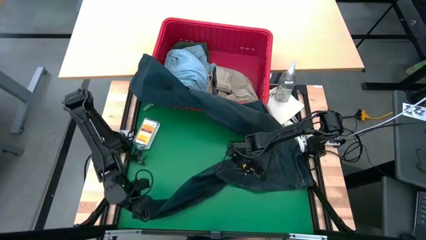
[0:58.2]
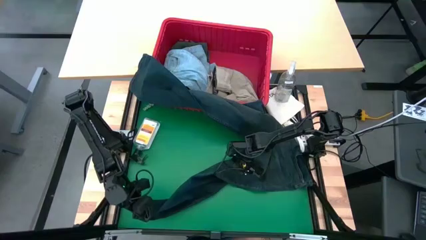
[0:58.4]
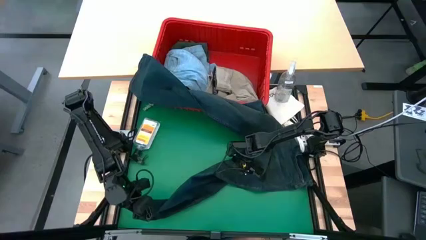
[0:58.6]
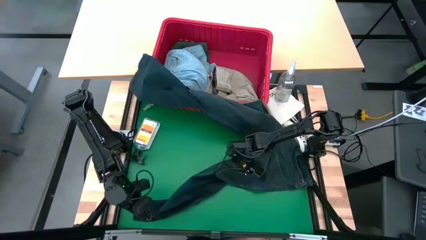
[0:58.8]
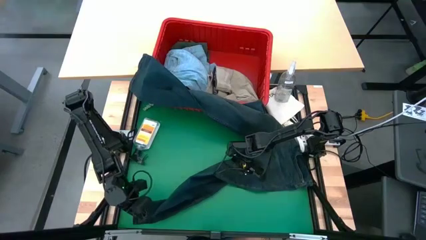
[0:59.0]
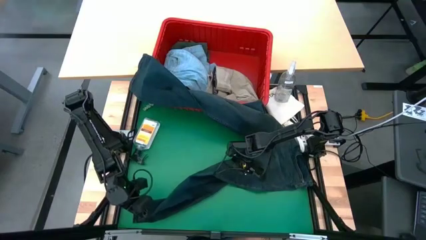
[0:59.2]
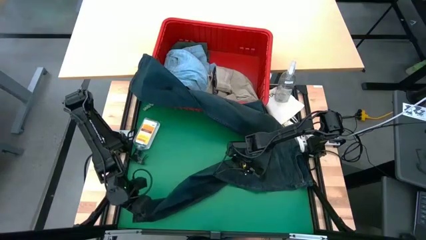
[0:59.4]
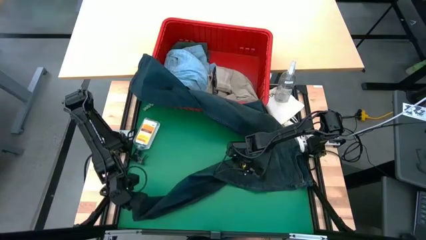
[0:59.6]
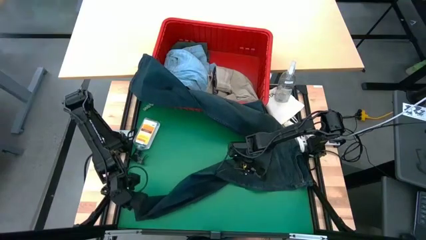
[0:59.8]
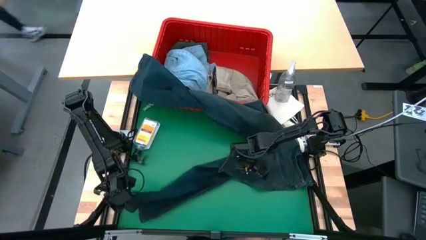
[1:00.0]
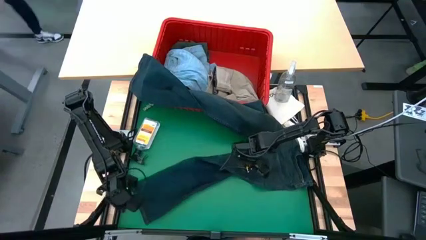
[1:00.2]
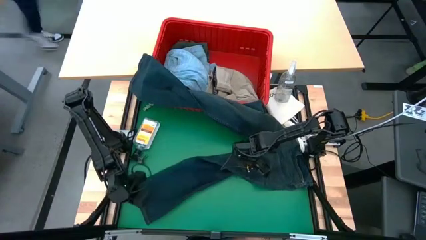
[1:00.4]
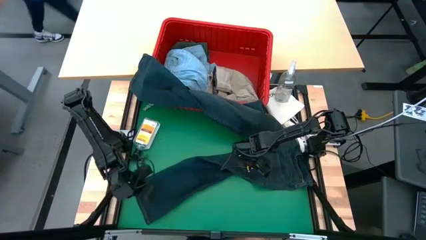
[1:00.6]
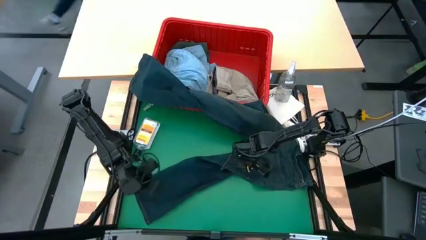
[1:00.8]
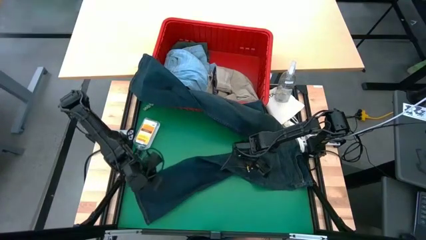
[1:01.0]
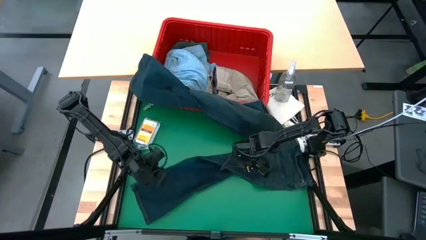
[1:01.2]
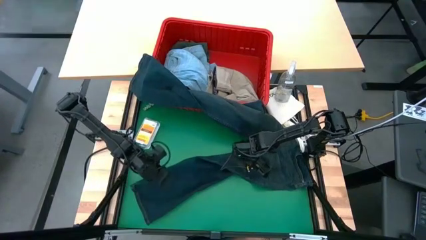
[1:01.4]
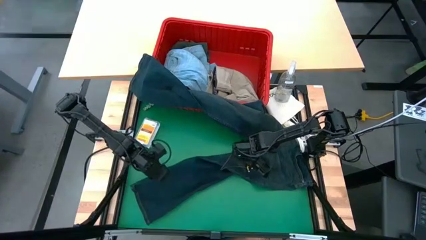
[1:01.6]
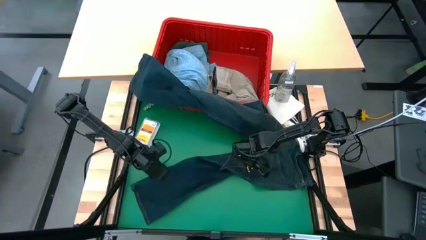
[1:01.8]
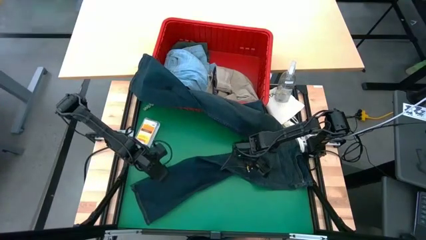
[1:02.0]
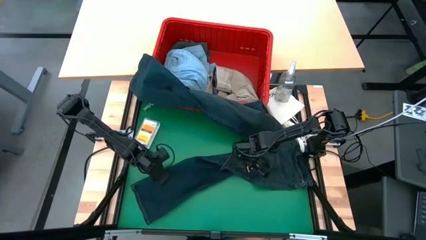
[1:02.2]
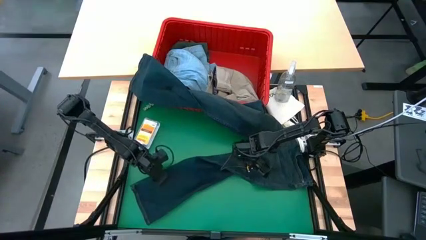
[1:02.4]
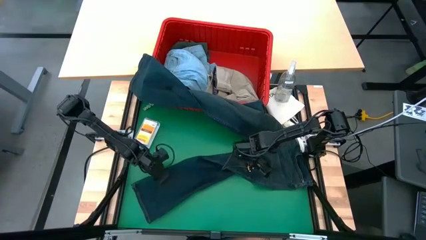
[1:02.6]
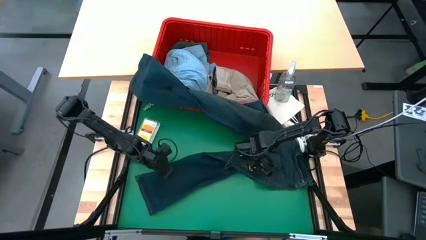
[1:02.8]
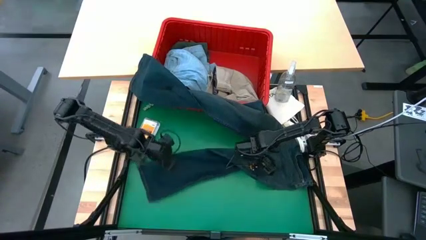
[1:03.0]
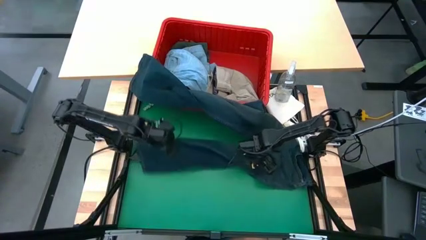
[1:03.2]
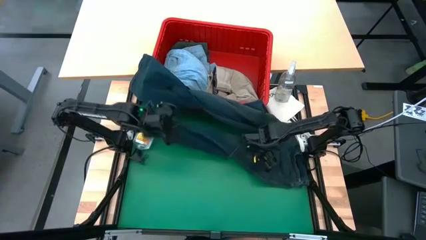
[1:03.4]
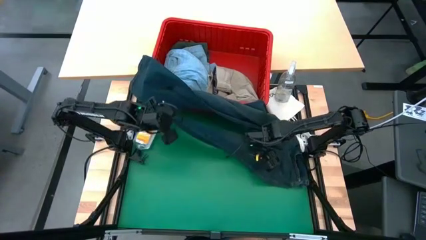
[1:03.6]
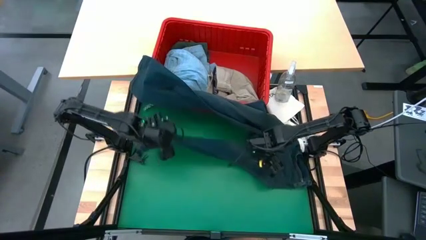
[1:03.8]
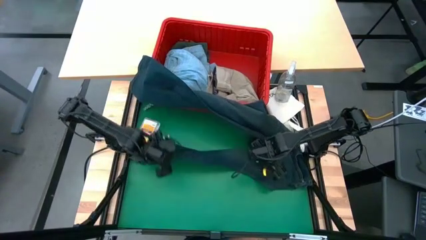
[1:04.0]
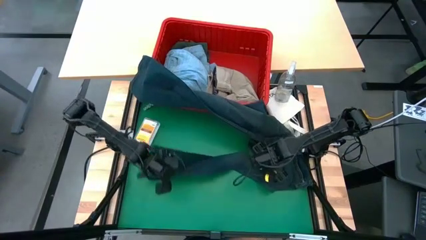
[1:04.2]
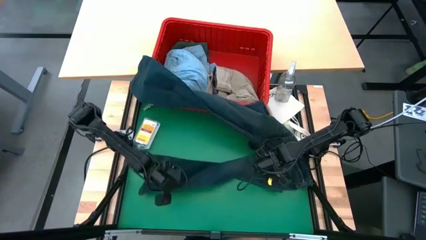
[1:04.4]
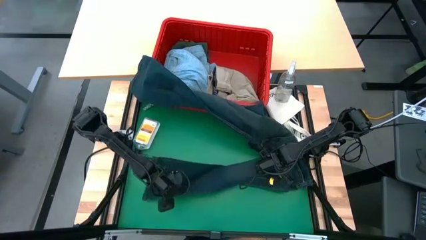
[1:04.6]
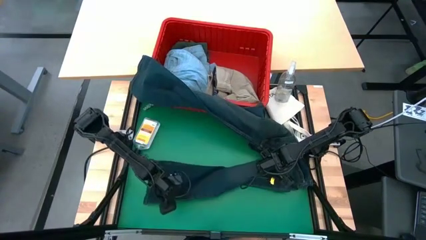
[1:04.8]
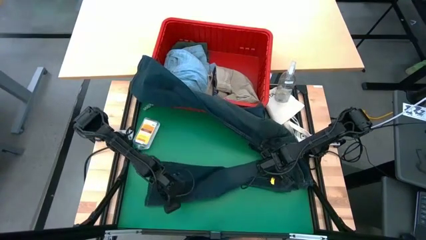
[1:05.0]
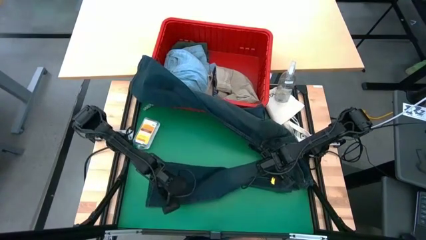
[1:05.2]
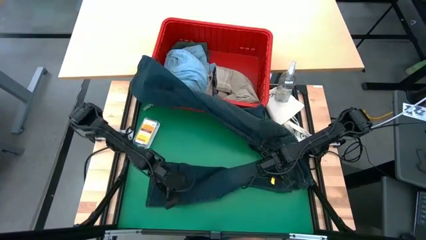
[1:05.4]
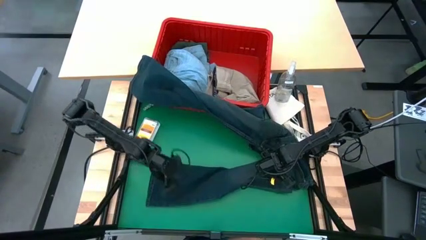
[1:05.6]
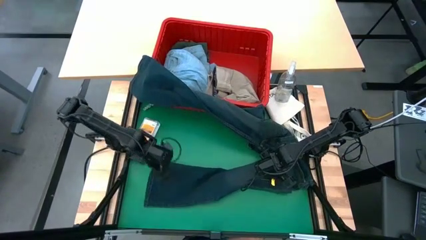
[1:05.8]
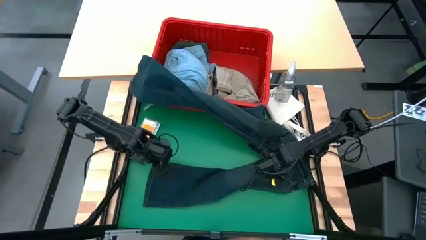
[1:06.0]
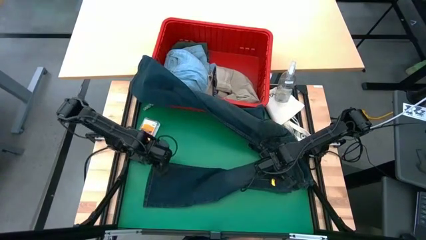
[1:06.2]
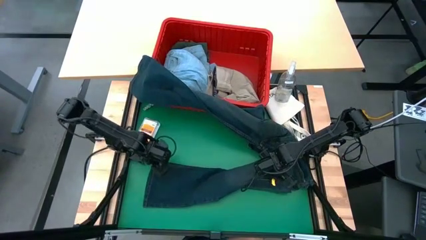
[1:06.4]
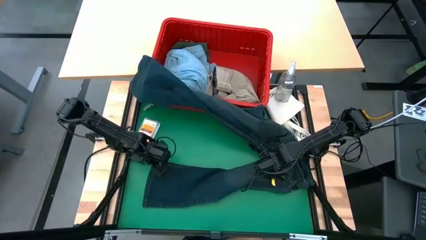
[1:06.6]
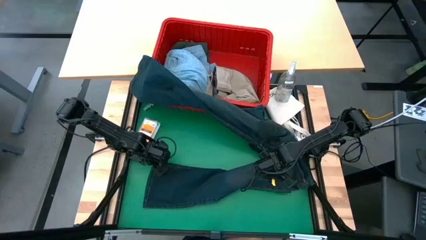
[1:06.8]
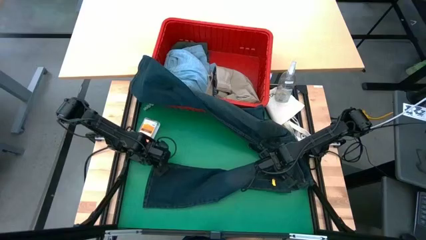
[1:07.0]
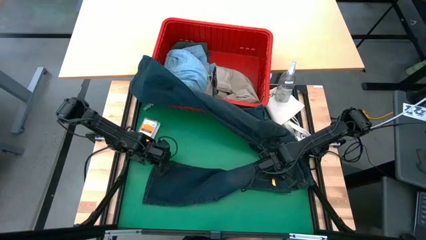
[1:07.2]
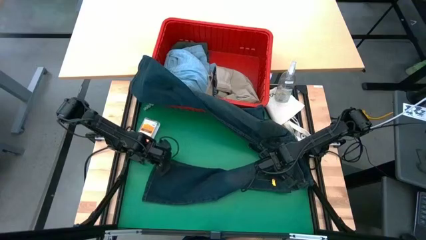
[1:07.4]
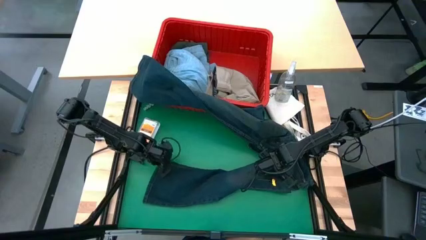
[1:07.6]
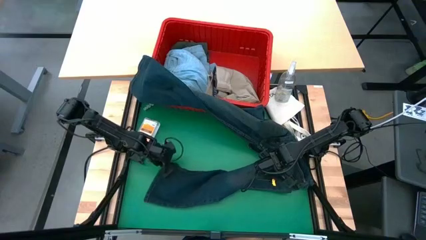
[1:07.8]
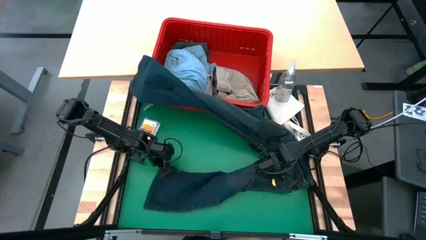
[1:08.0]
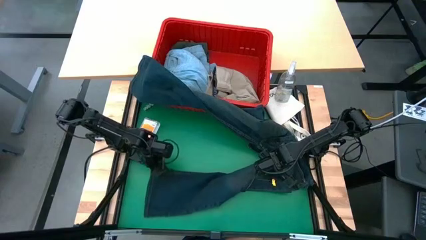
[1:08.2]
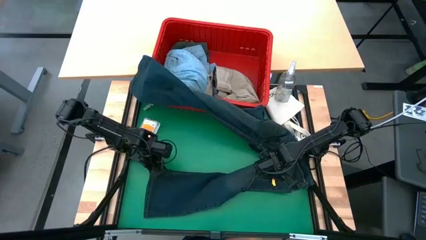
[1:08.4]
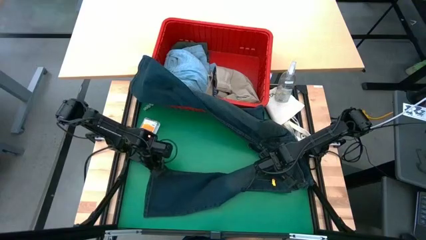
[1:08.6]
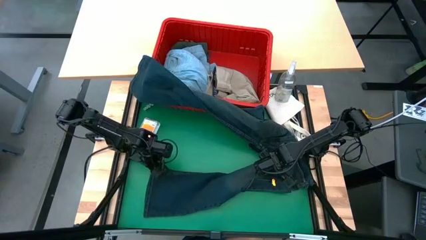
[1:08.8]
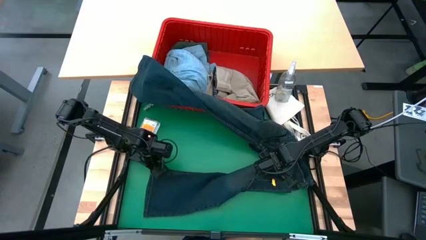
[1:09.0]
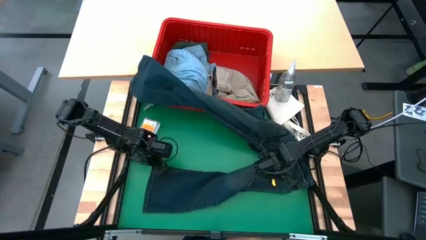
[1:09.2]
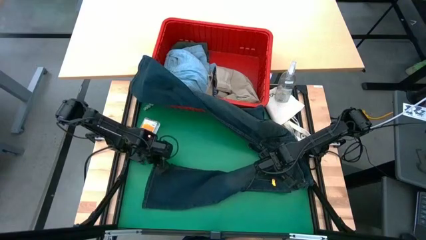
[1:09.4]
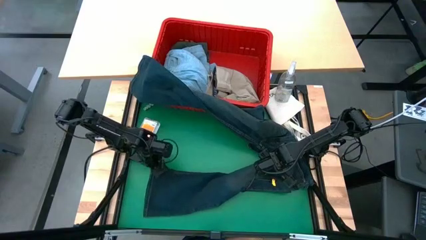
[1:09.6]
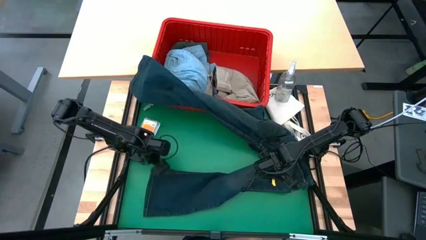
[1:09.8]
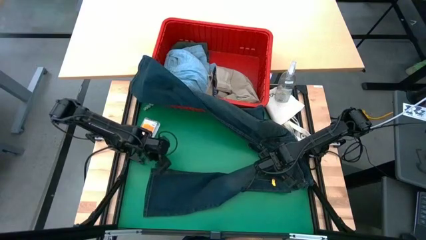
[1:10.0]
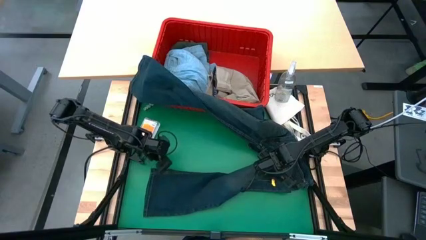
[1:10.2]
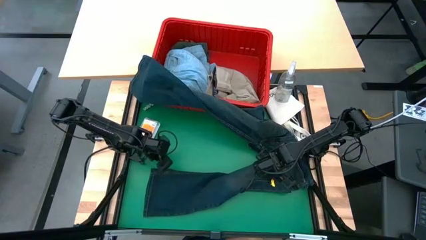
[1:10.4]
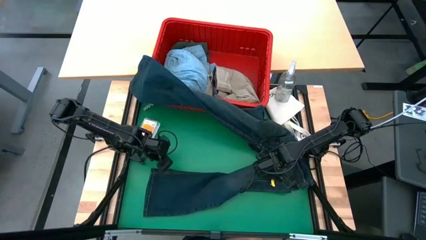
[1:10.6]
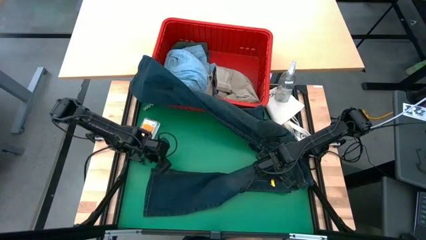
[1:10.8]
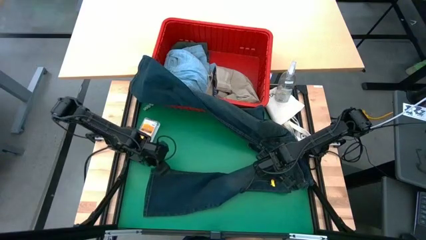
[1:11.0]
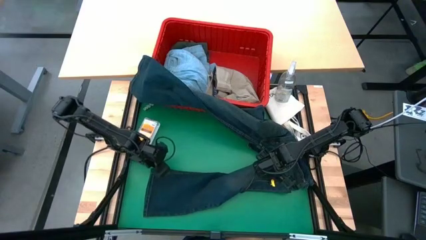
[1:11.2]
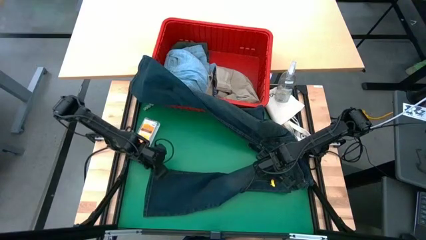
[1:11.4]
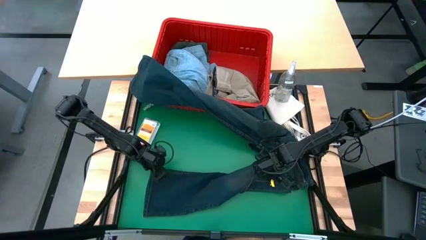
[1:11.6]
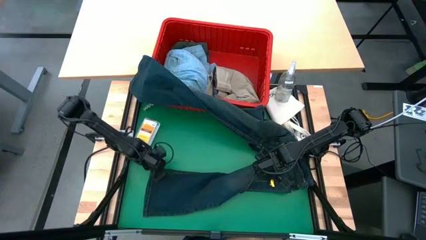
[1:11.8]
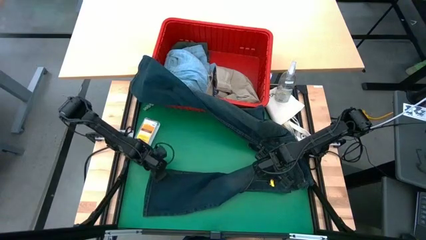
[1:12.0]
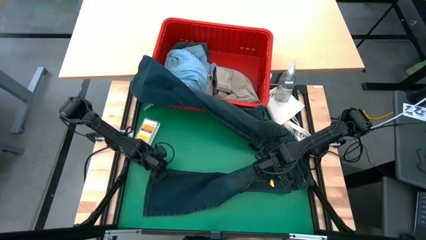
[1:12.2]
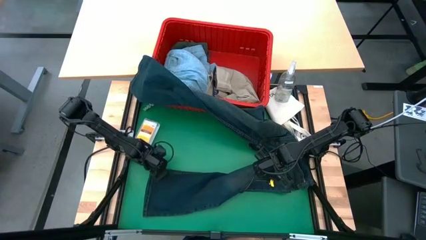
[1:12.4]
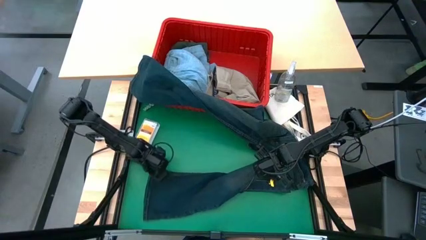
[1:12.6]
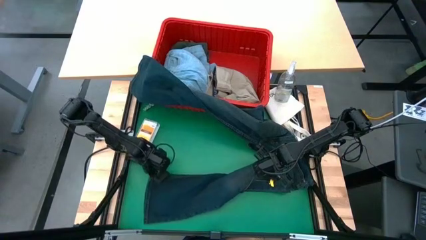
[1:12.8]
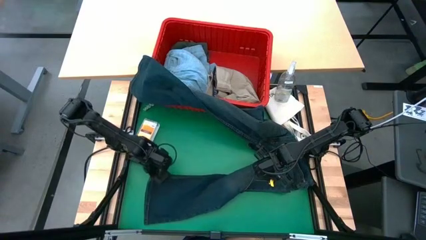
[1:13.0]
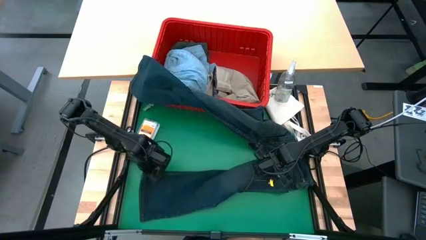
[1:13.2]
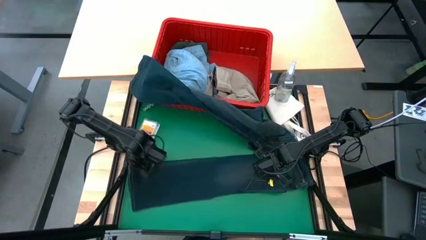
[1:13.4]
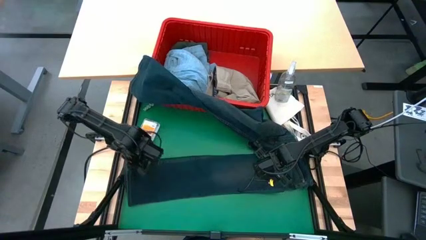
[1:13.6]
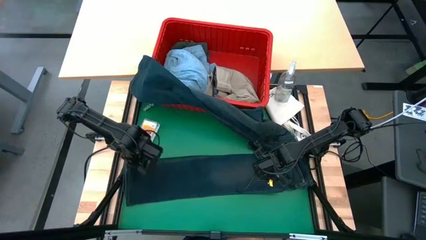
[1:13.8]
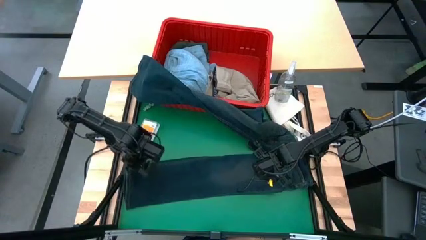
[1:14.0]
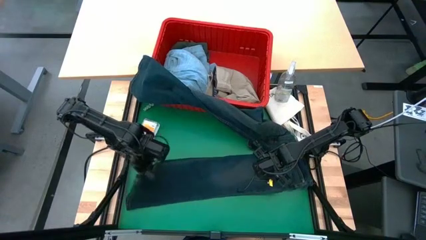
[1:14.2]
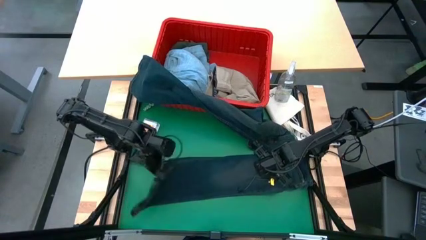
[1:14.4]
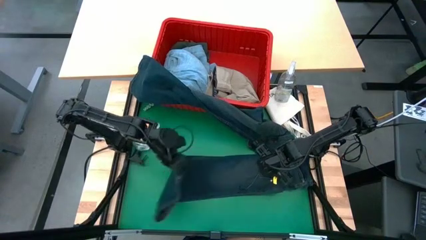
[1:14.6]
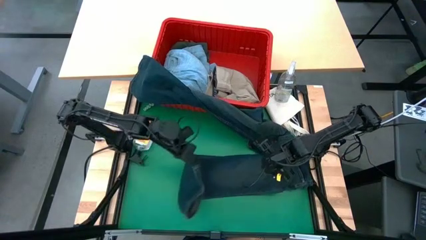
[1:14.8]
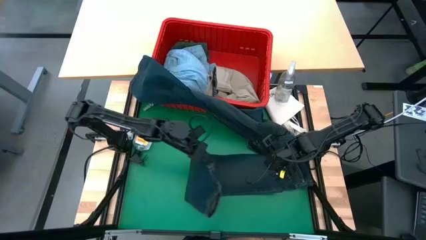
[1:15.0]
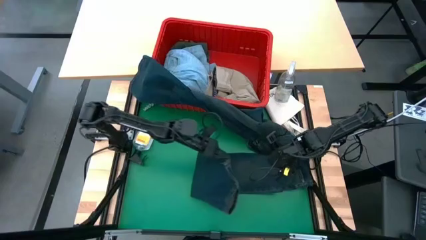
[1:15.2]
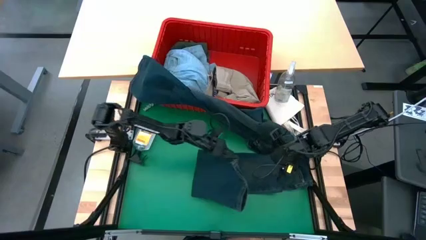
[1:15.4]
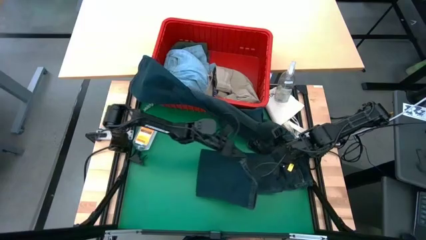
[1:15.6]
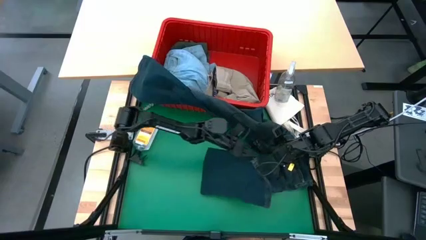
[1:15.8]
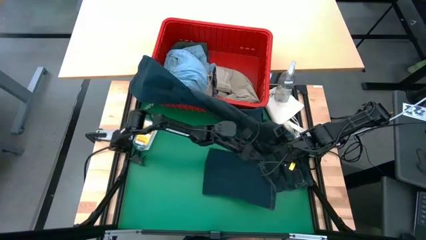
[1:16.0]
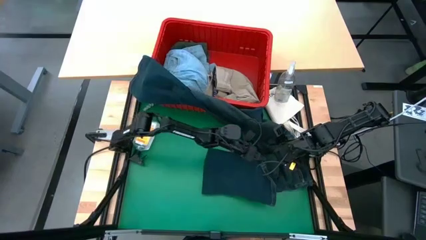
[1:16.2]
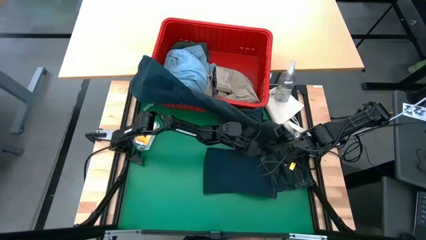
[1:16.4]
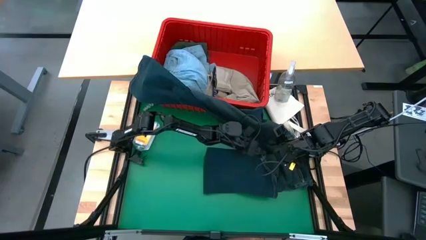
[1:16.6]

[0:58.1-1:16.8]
Task: Fold laundry
Fold the dark blue jeans
